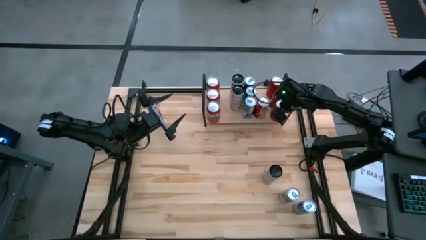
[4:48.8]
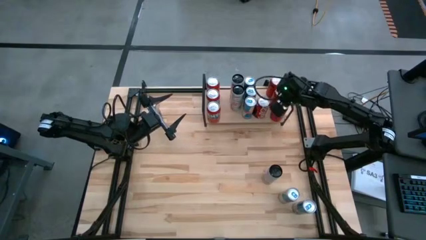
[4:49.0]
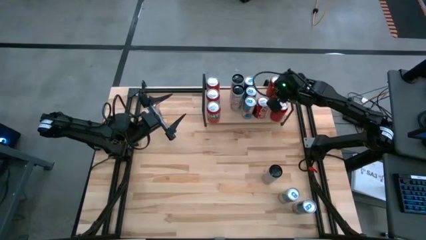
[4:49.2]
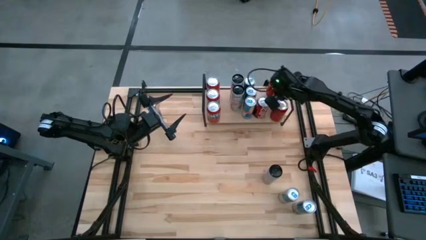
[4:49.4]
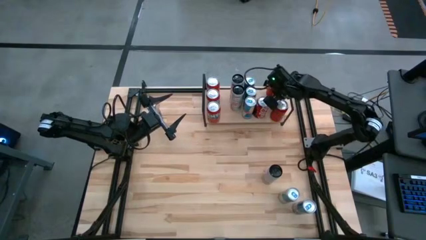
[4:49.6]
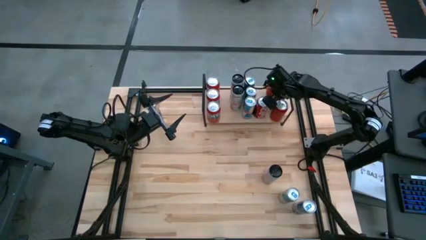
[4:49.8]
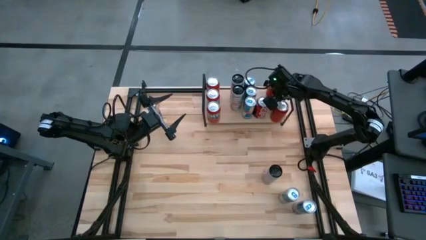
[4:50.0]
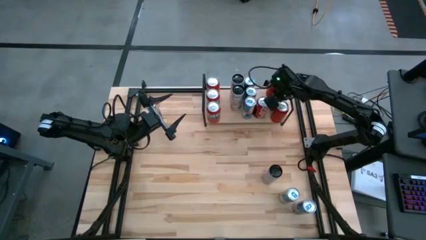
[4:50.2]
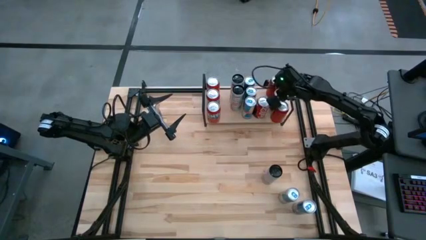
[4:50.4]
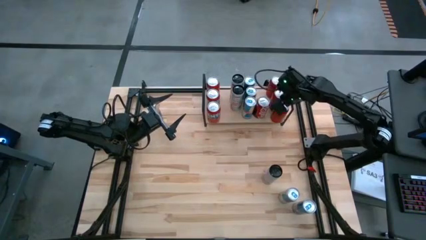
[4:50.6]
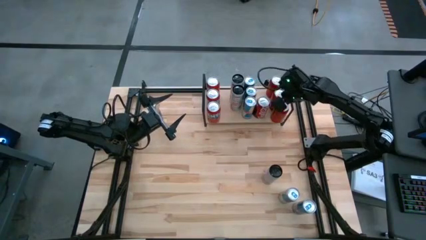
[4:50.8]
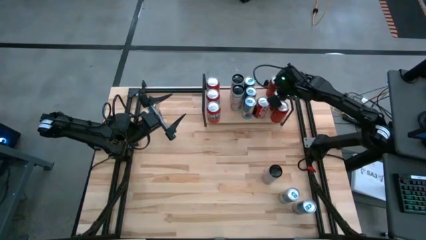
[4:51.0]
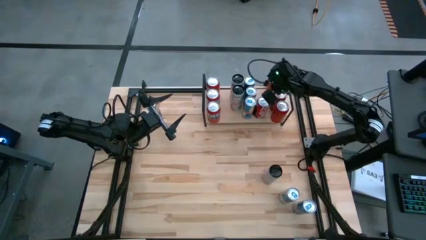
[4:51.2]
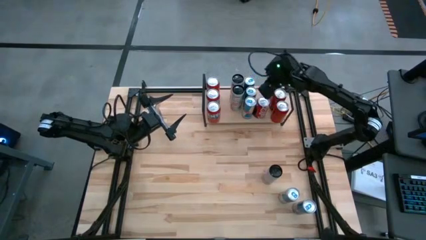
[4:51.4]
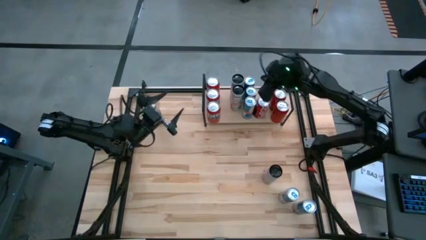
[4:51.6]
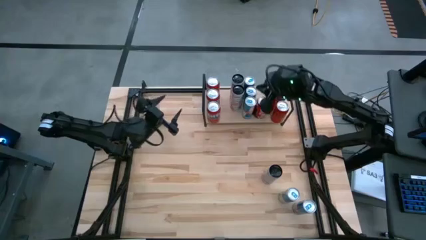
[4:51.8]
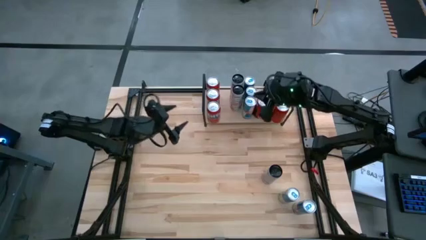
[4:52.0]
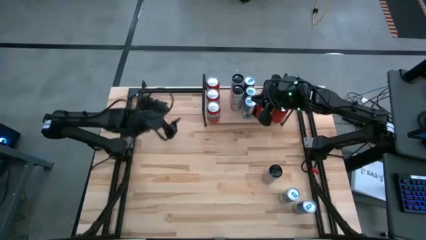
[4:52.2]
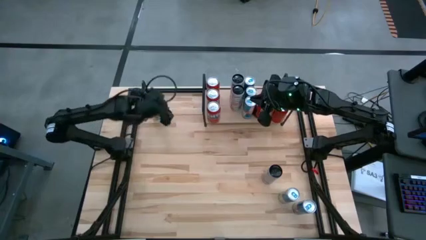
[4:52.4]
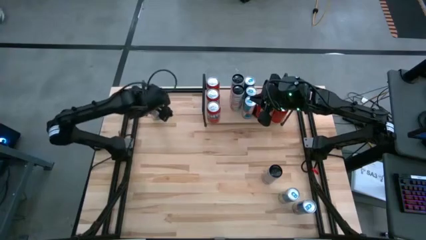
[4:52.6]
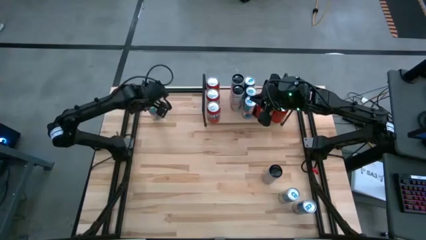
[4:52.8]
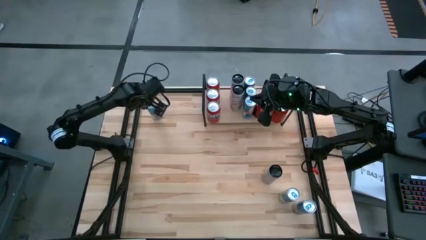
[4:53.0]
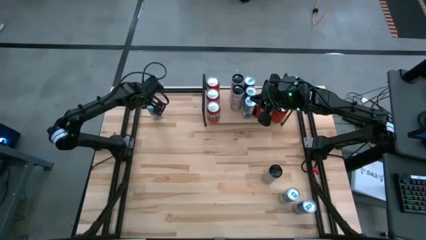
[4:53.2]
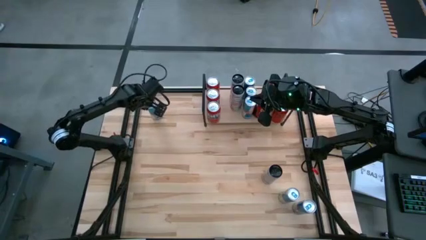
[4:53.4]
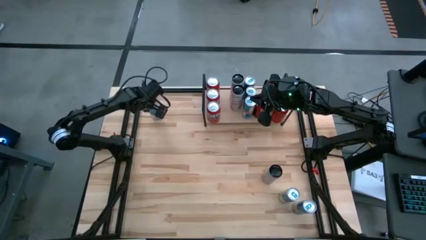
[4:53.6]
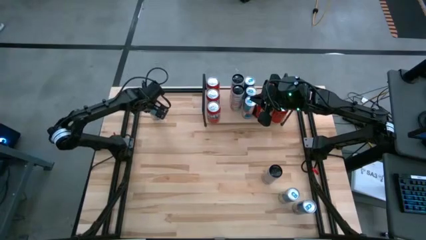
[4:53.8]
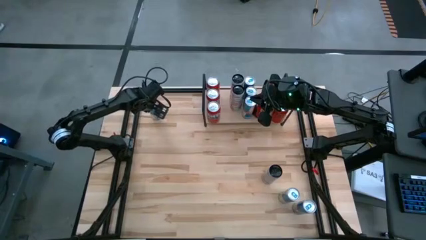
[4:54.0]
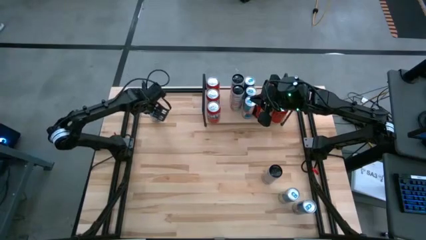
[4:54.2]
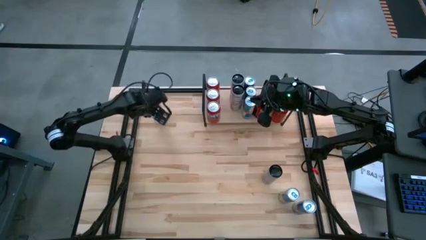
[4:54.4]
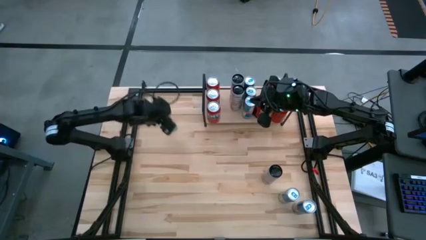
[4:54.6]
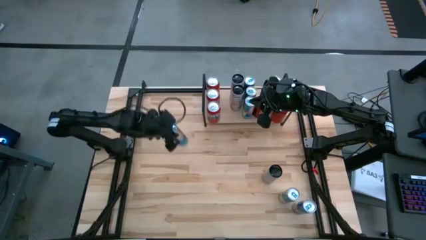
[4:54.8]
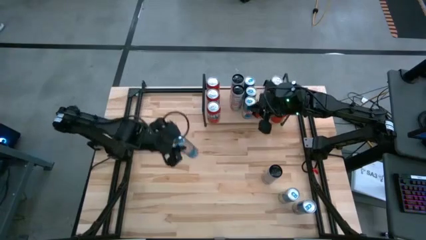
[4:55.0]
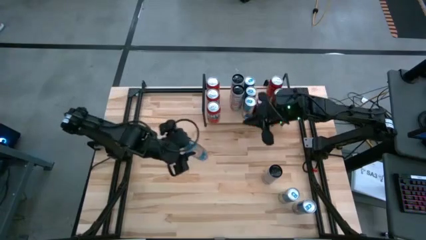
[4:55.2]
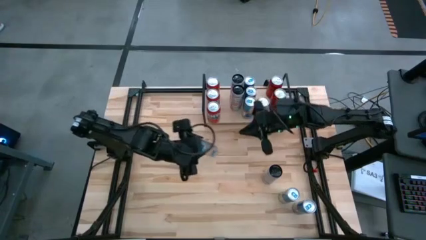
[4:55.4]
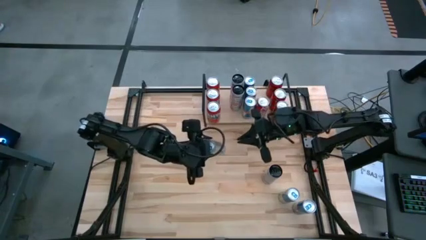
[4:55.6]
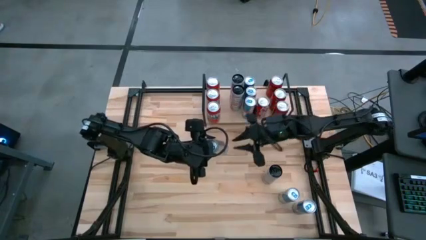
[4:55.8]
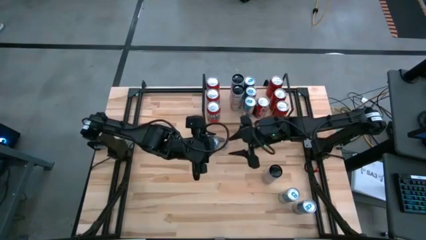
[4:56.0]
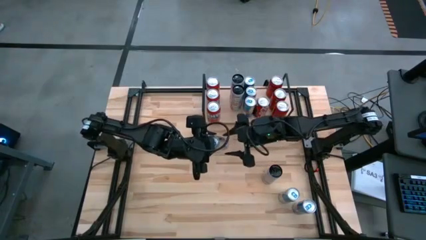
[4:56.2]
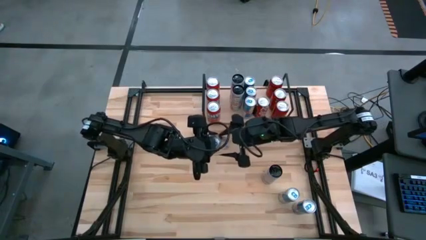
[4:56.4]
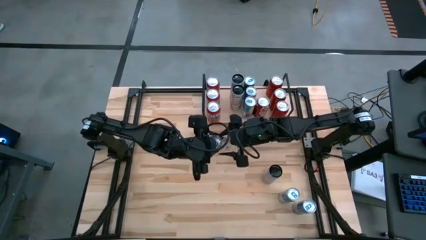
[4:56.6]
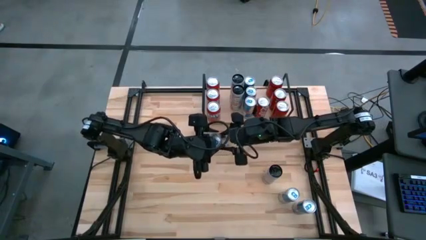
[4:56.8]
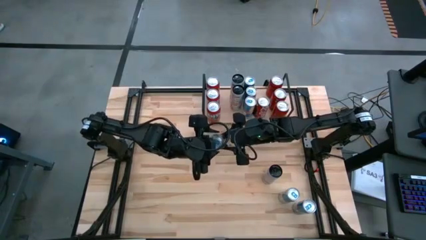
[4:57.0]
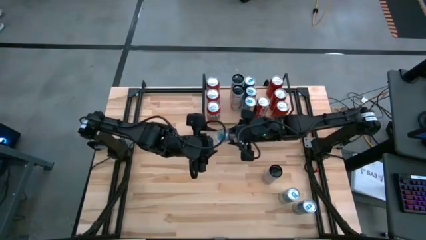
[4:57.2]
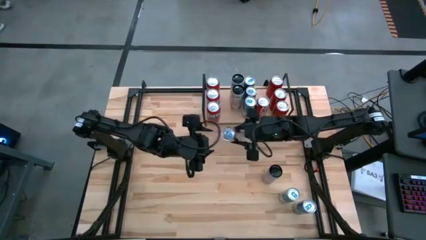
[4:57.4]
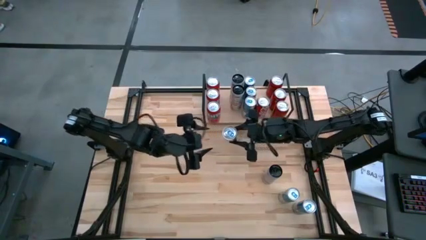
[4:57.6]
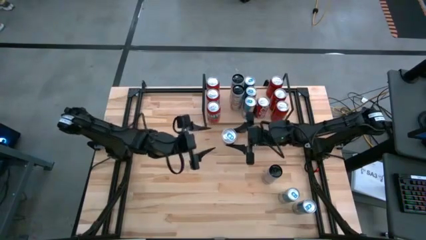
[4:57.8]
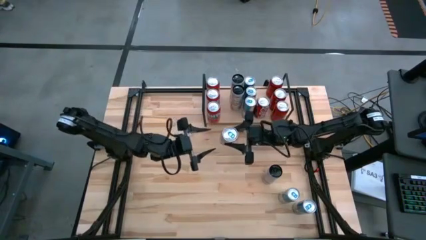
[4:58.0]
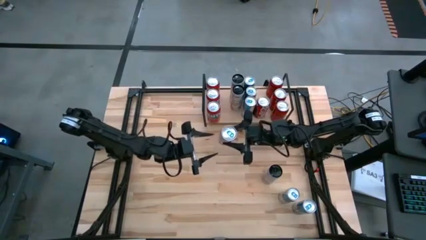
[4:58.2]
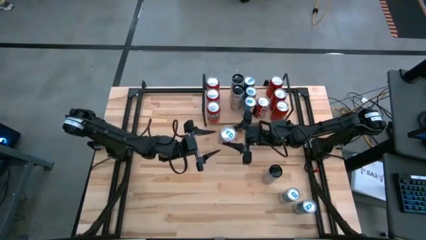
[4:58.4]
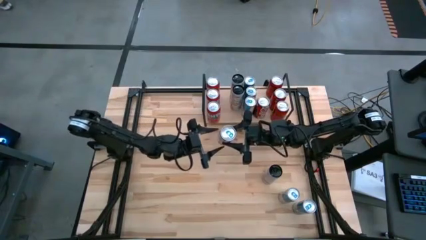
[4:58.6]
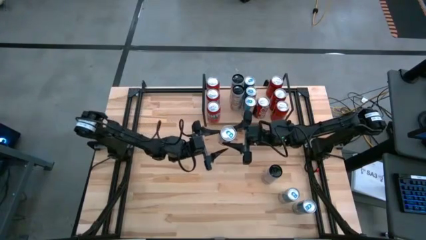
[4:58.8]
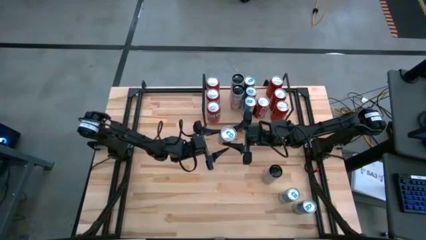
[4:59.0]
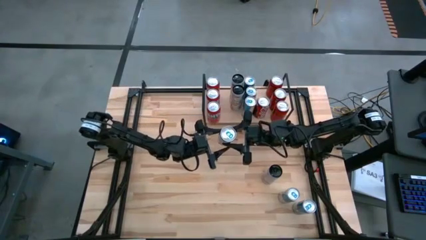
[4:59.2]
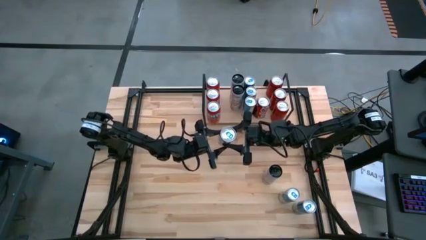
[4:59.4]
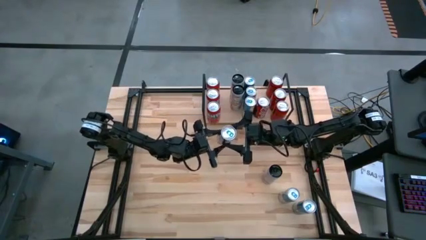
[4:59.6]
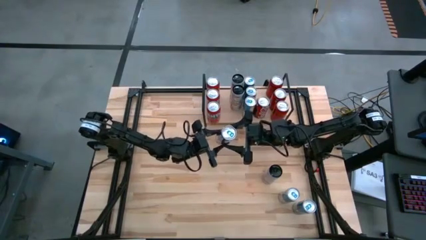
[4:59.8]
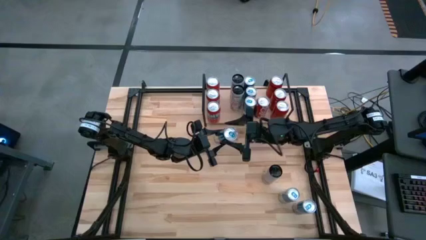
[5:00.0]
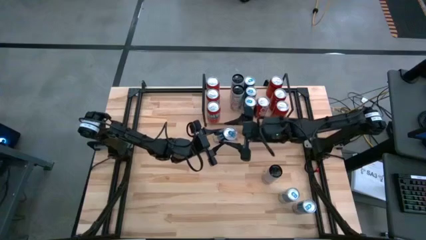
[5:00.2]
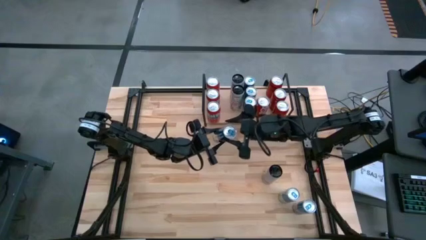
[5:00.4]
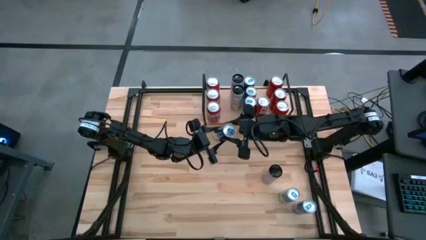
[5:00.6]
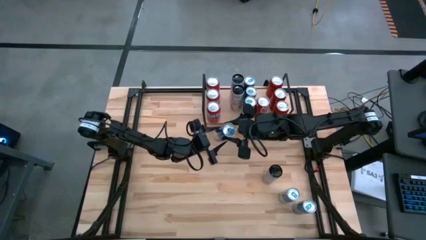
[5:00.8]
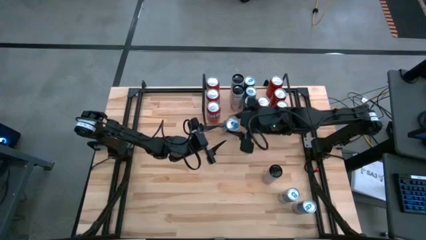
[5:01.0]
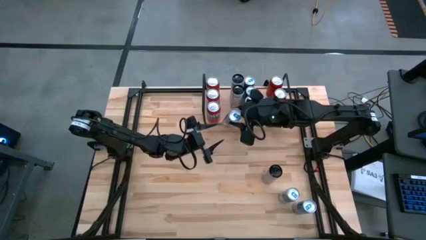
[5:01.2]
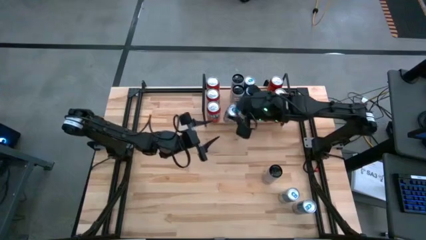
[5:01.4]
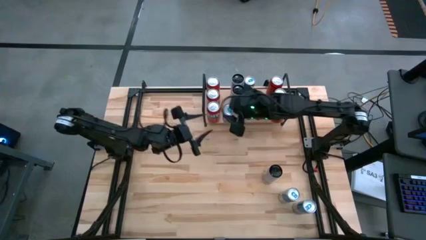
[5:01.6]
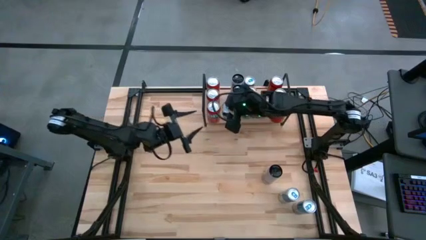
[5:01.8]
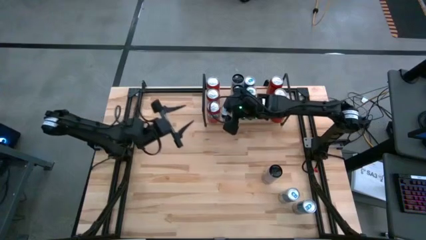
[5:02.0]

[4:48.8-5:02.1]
Task: Place canned beverage on shelf
Put the blue soda can on the shelf
